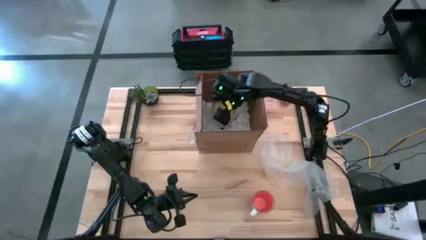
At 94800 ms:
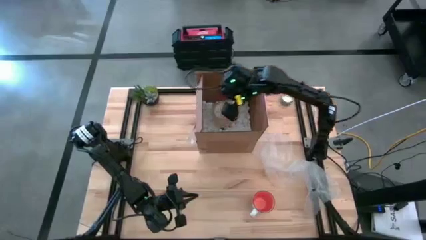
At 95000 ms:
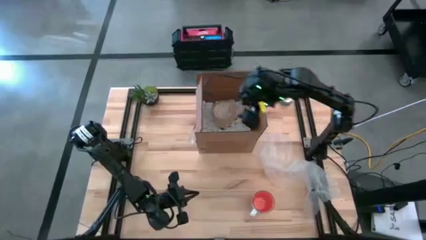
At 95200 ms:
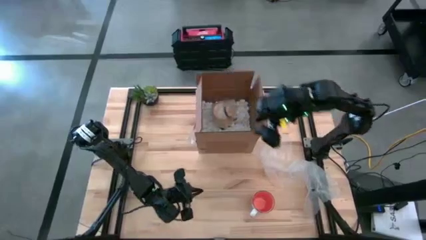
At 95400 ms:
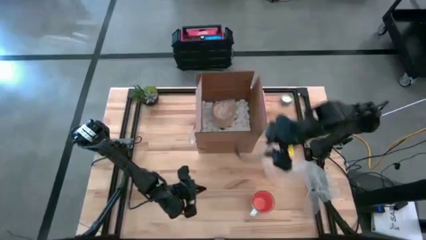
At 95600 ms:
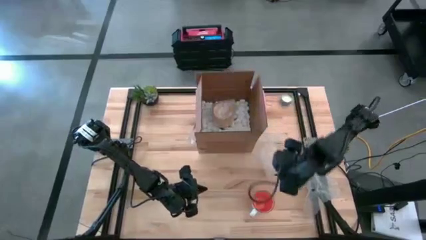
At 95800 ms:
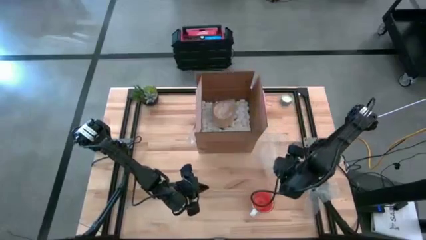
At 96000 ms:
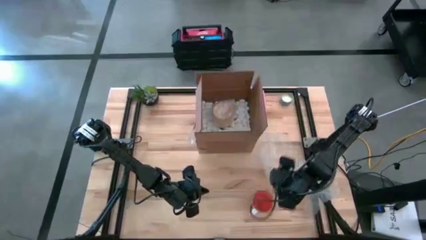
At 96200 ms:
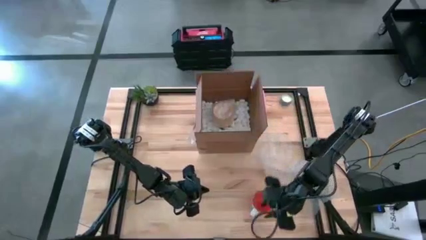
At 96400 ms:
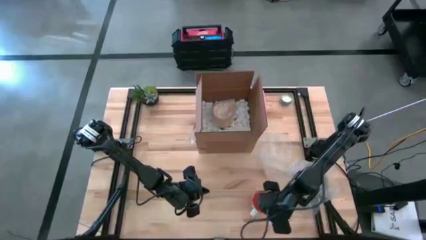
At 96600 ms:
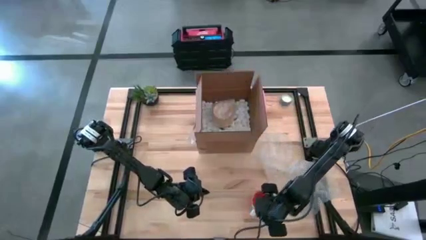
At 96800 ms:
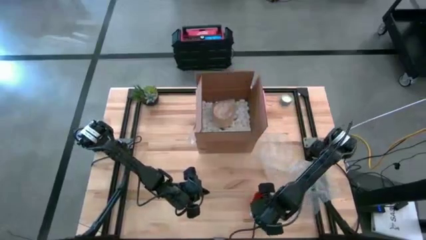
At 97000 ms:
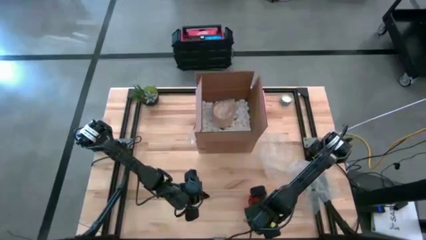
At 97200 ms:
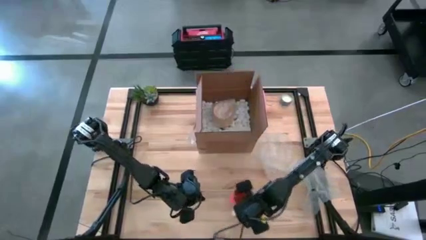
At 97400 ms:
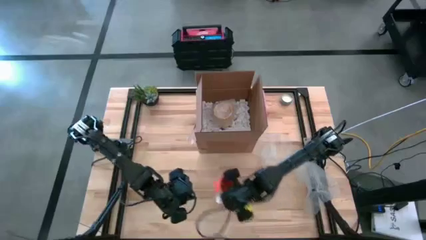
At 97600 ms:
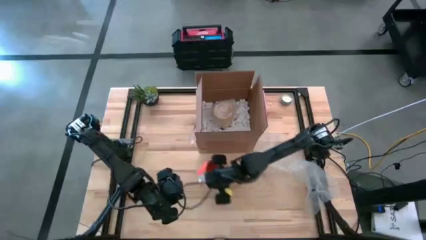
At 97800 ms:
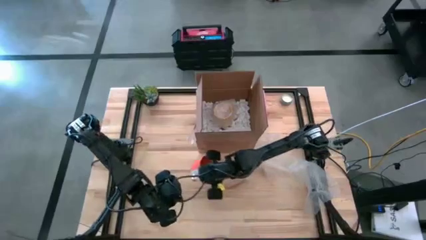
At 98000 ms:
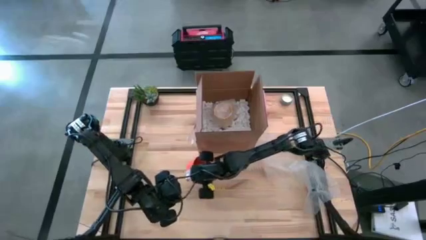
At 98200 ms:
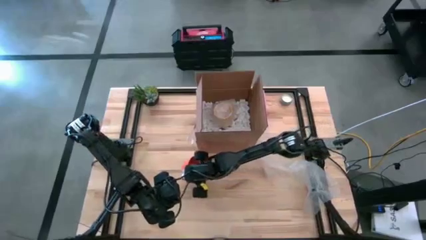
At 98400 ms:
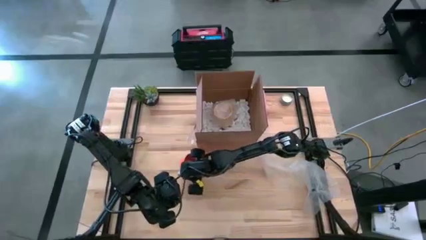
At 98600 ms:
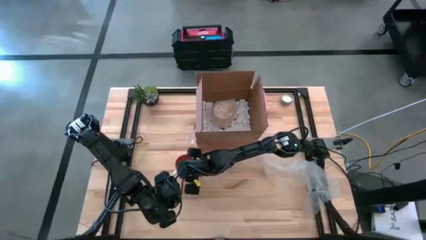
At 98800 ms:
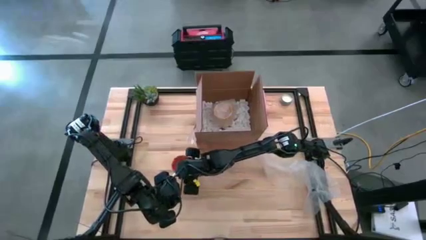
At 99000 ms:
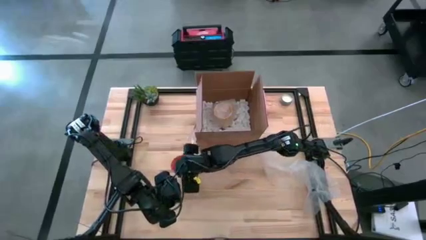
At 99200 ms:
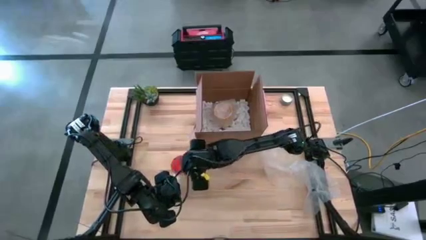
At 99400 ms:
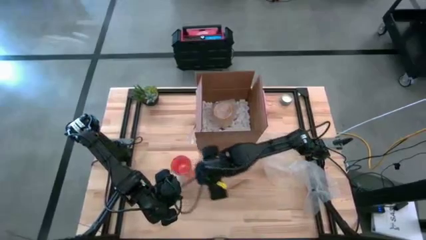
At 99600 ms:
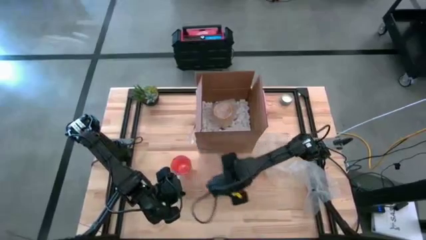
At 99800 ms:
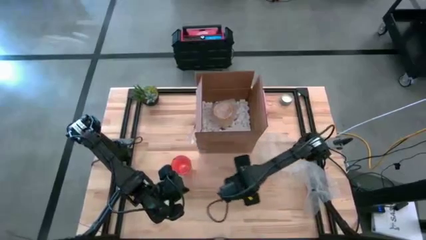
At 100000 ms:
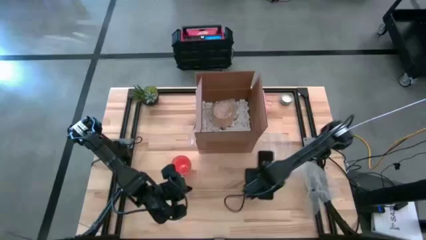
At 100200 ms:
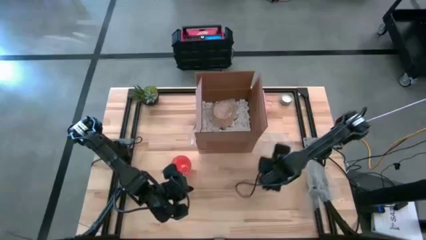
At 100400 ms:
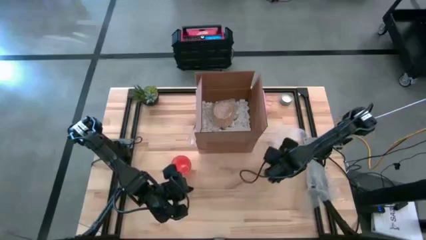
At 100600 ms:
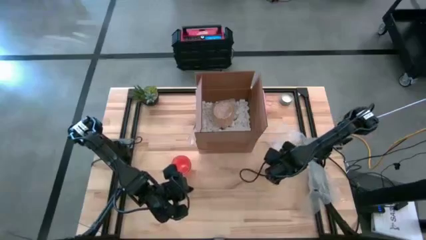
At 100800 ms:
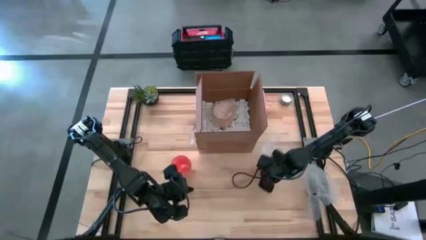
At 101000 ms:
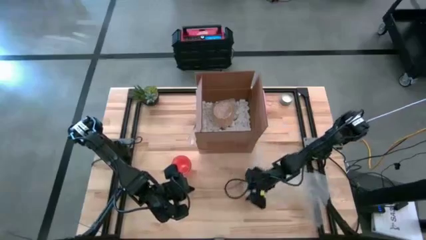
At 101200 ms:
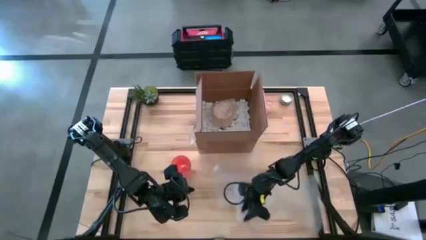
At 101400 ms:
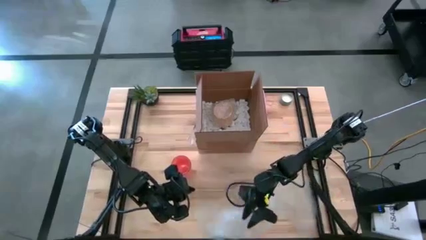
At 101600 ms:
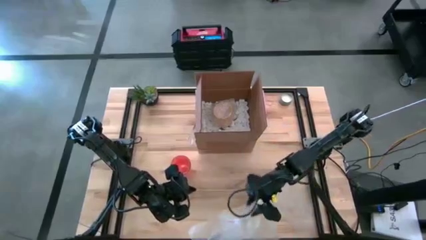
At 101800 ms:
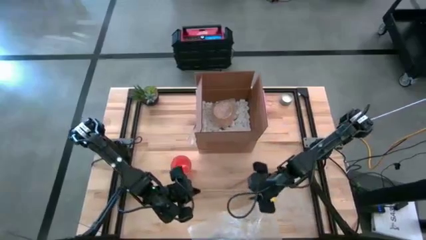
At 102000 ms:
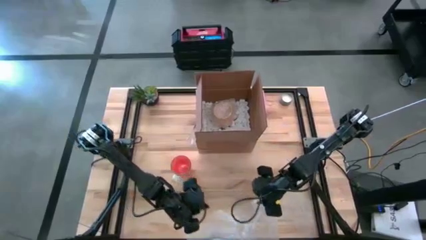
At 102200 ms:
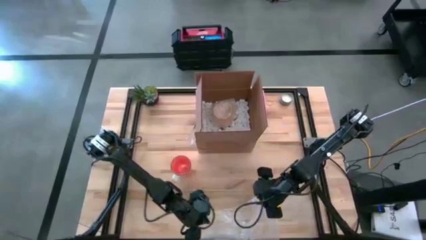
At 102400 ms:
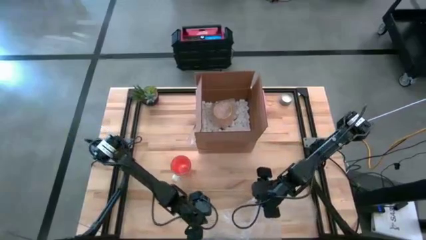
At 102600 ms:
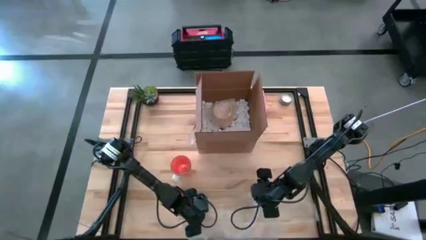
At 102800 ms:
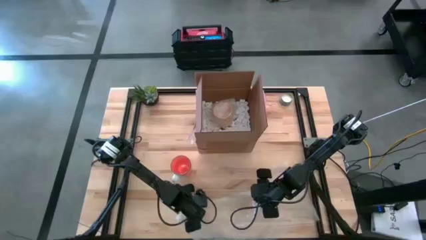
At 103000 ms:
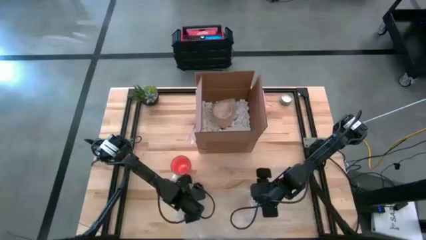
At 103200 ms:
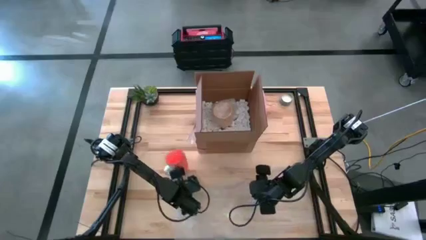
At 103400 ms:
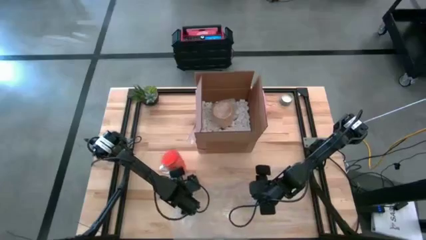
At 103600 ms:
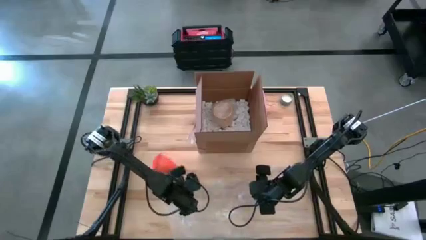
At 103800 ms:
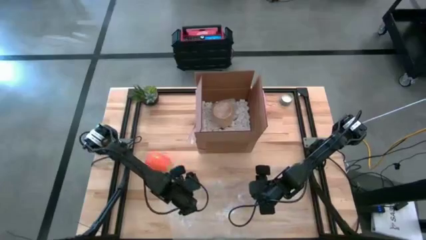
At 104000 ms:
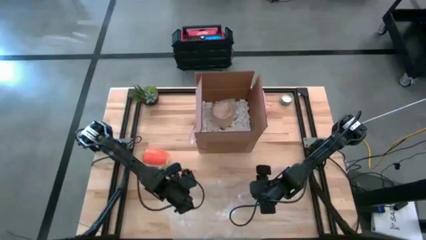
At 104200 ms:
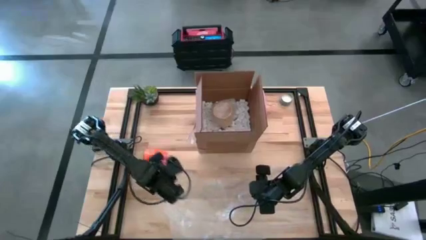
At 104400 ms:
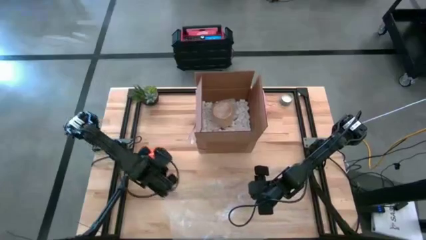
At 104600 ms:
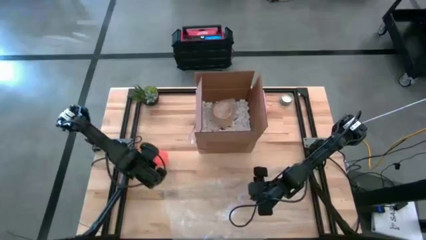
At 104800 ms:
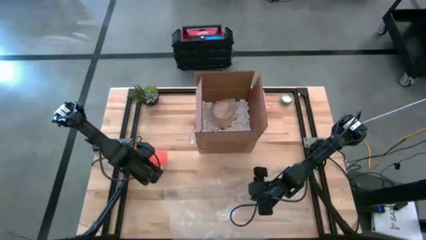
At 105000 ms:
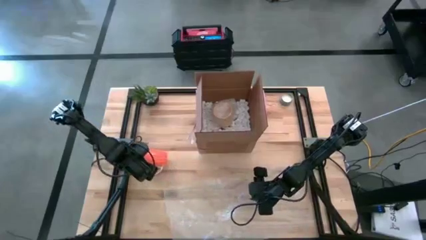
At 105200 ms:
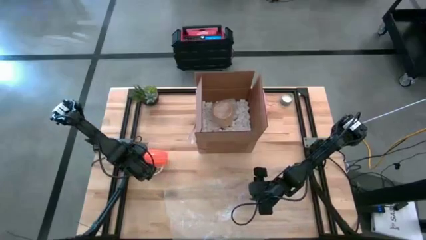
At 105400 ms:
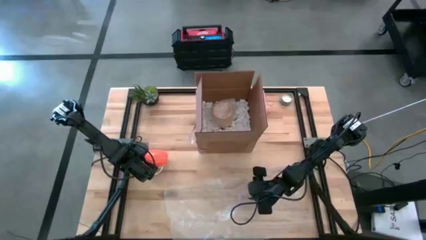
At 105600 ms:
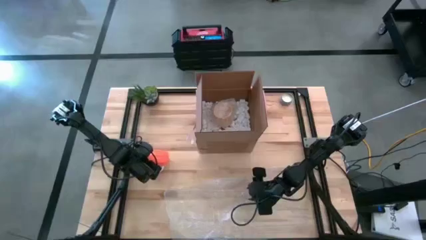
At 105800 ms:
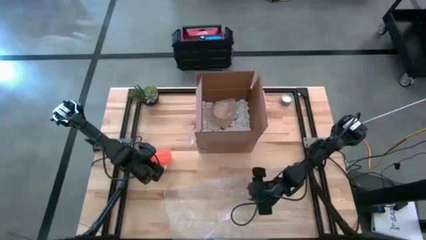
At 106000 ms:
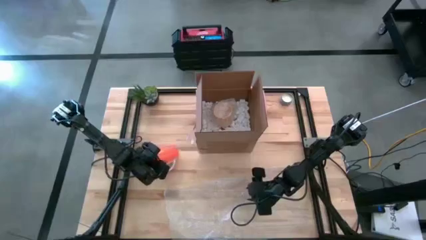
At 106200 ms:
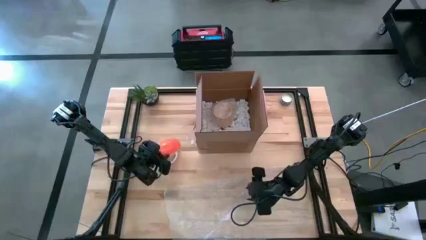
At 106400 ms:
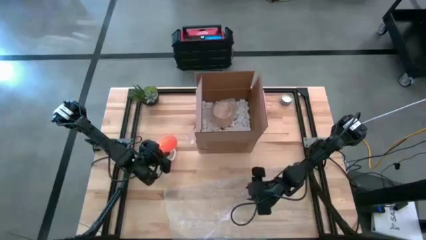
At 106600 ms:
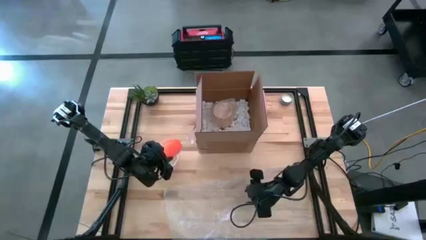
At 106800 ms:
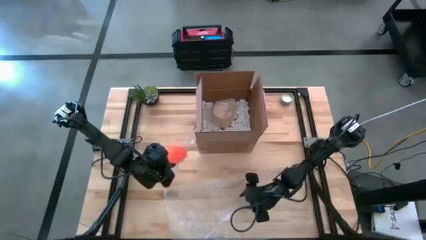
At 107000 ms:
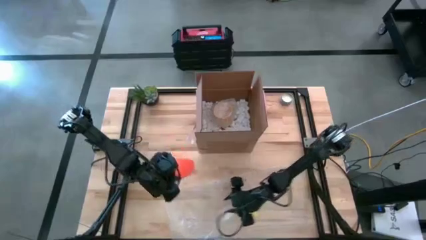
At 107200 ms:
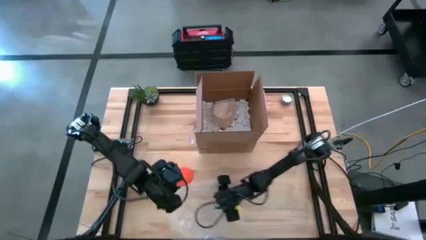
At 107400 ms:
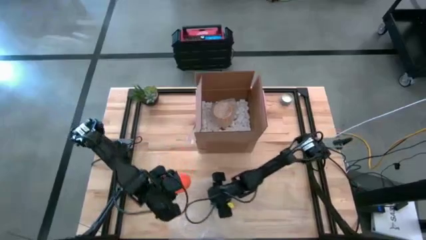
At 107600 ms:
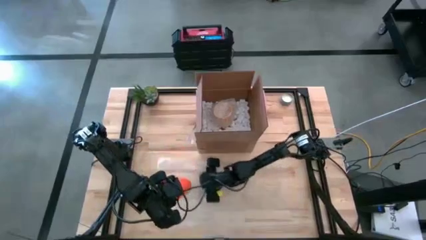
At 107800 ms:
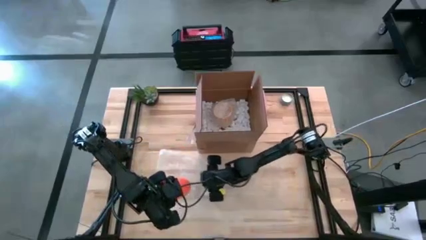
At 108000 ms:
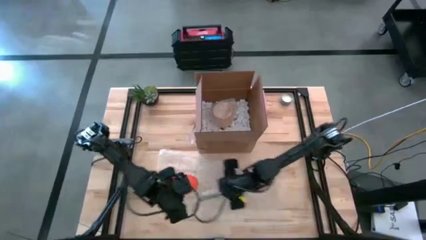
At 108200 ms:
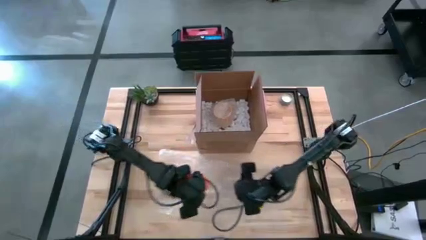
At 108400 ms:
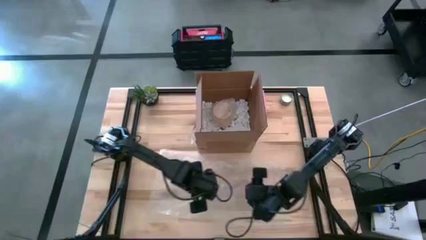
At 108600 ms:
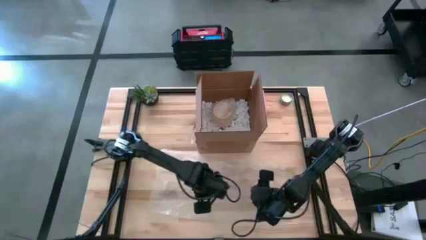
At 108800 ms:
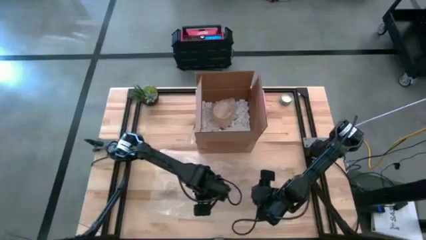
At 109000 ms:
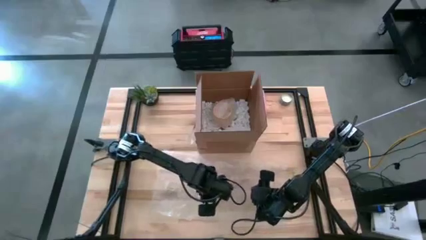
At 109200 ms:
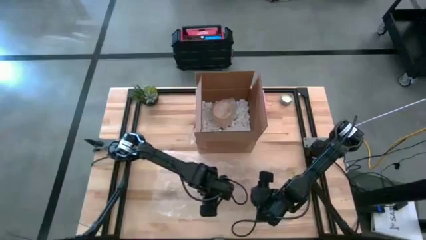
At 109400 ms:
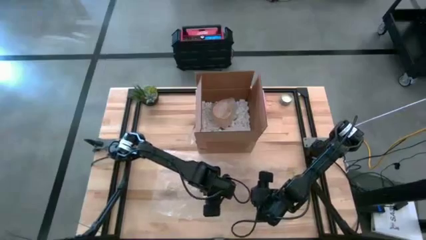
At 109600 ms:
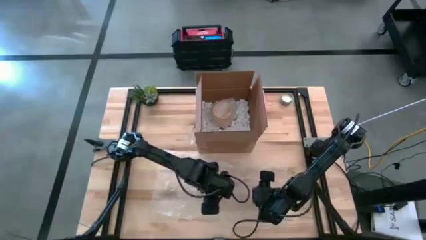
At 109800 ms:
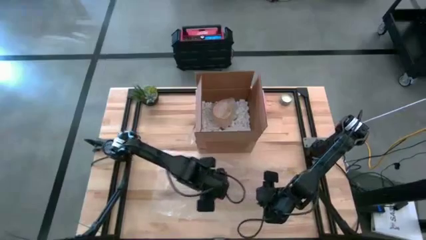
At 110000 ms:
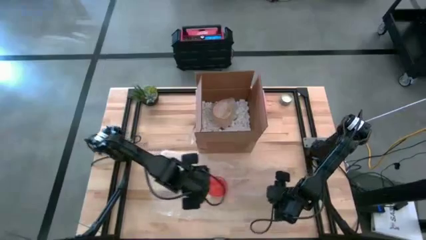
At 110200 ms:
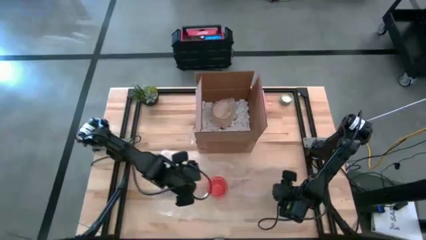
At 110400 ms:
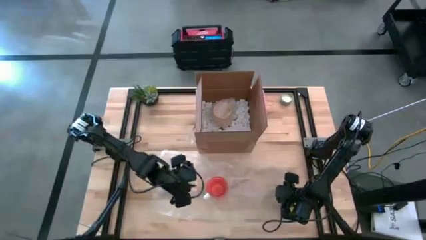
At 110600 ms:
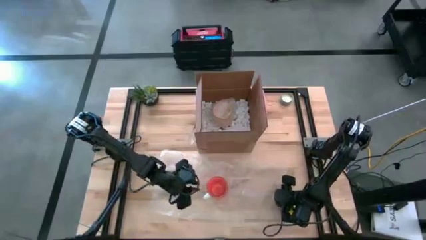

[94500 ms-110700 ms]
Task: wrap mug
Wrap the orange mug with bubble wrap

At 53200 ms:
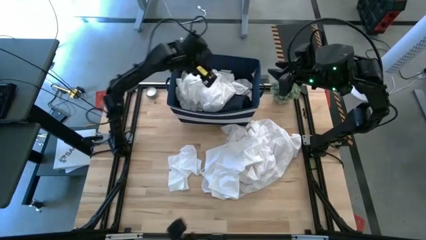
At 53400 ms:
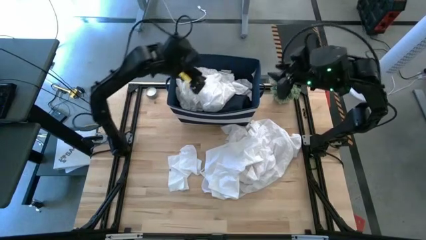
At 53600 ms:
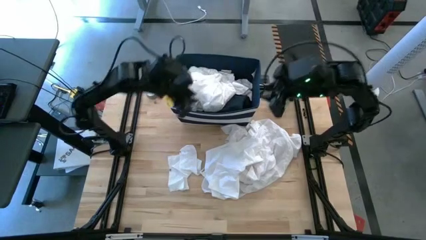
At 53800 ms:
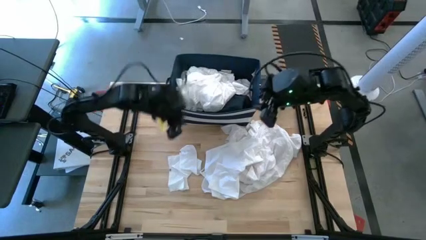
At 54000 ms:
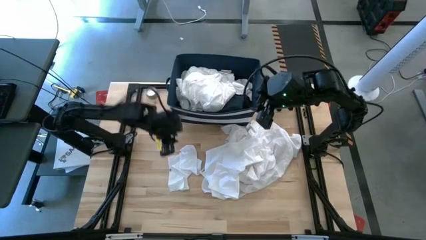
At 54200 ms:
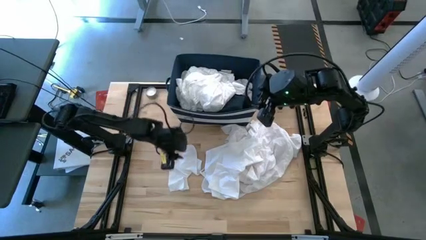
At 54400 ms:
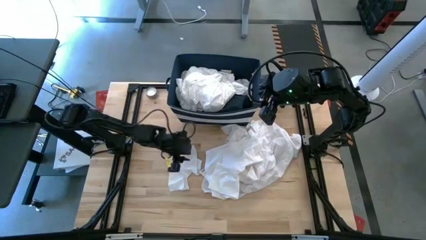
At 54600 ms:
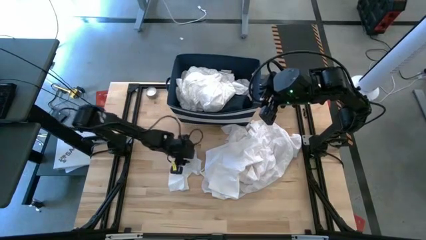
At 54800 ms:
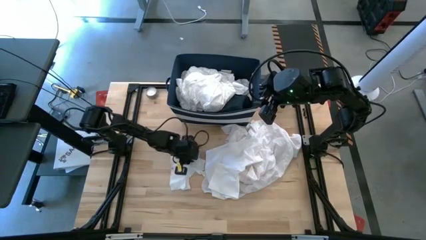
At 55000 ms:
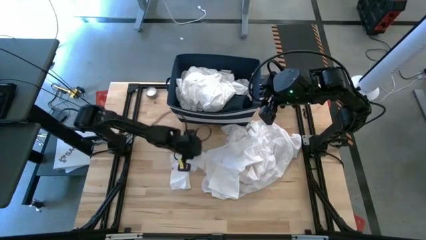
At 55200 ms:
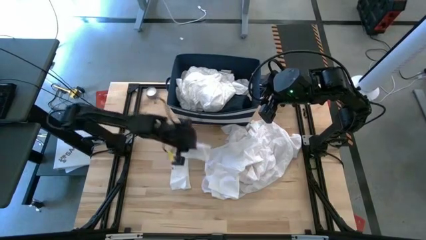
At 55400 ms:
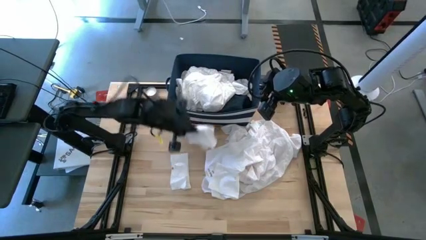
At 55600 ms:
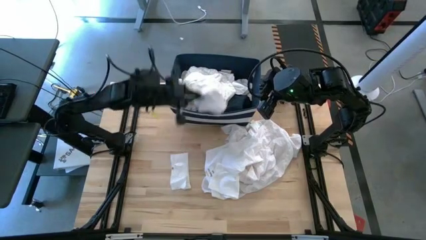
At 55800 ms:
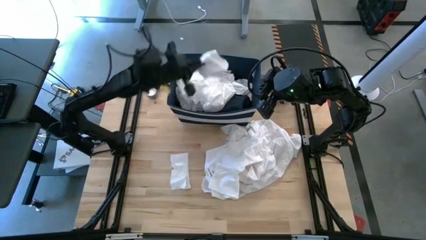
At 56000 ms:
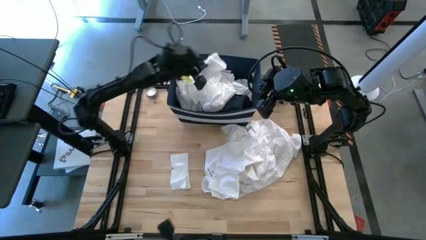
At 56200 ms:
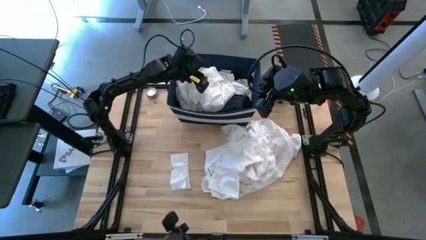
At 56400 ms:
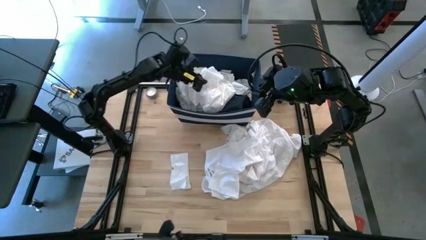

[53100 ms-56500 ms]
Task: Sort clothes
Put the top white sock into the blue bin
